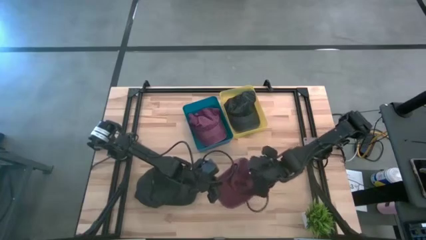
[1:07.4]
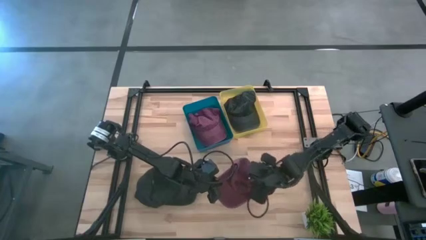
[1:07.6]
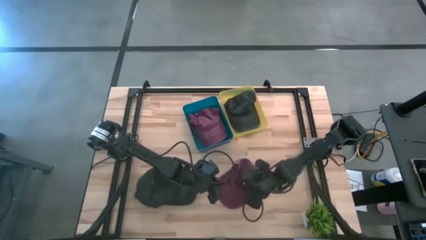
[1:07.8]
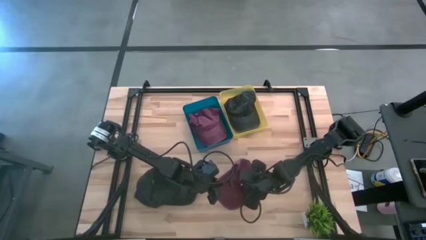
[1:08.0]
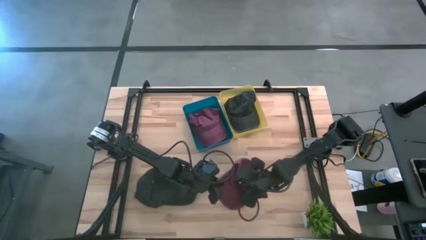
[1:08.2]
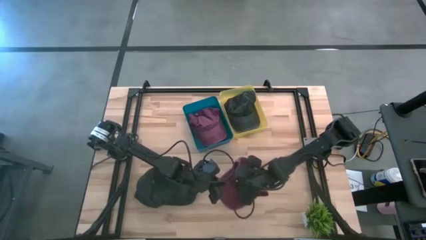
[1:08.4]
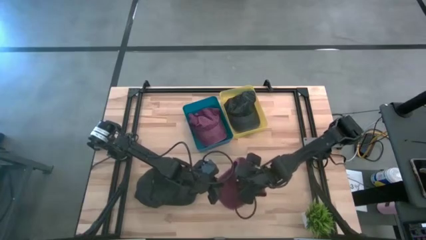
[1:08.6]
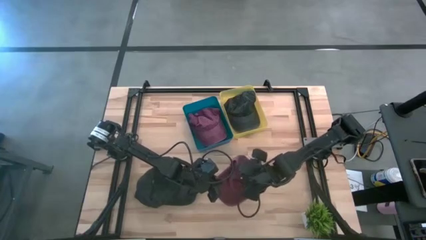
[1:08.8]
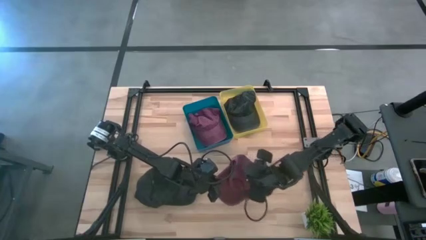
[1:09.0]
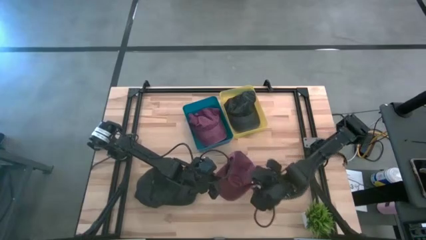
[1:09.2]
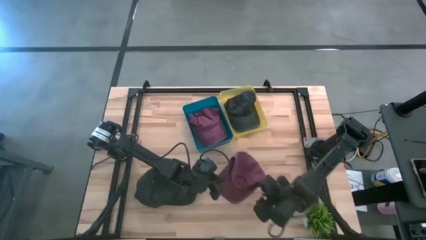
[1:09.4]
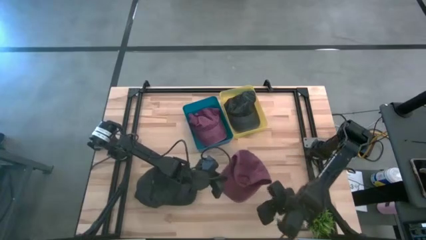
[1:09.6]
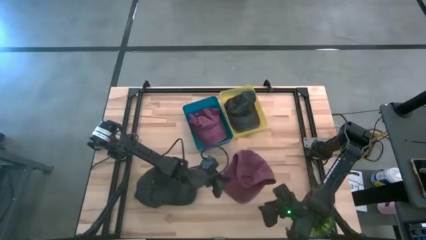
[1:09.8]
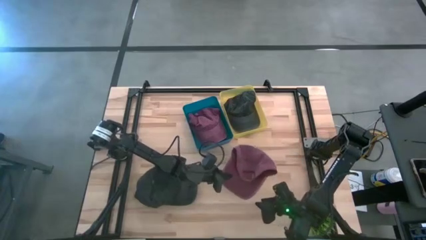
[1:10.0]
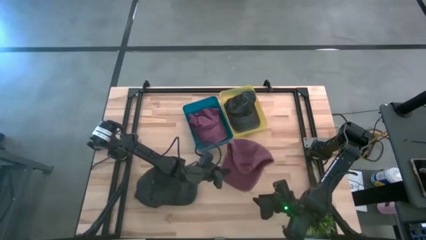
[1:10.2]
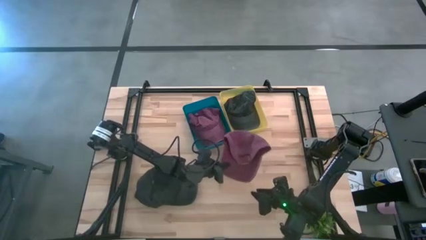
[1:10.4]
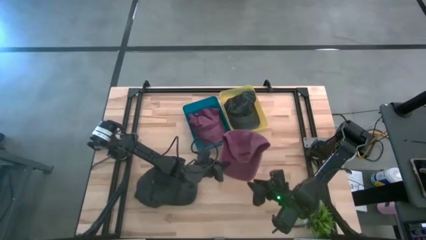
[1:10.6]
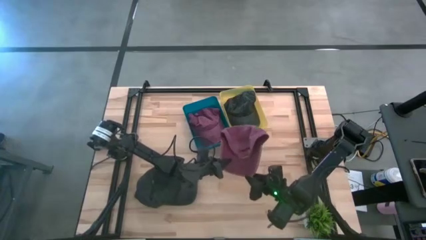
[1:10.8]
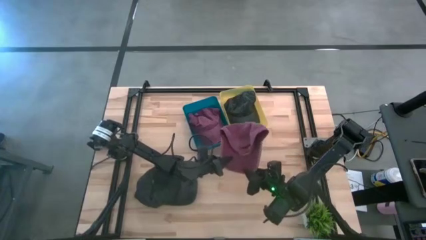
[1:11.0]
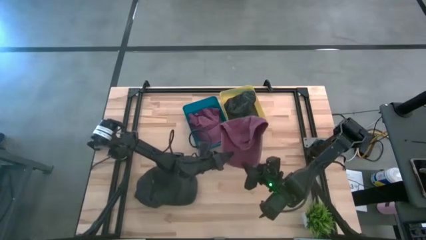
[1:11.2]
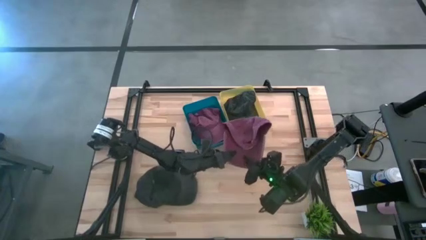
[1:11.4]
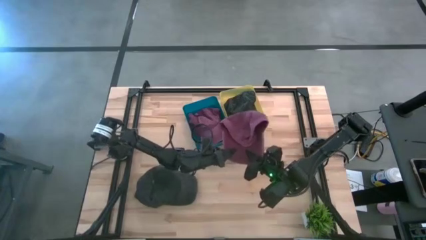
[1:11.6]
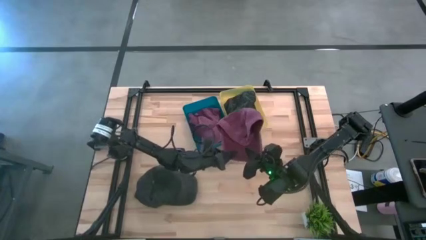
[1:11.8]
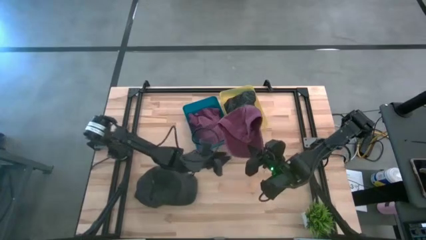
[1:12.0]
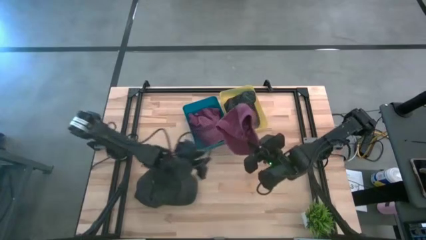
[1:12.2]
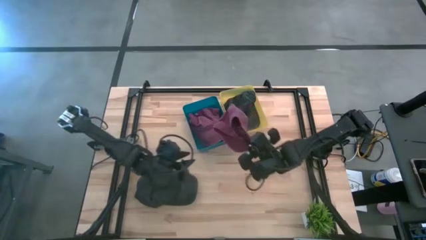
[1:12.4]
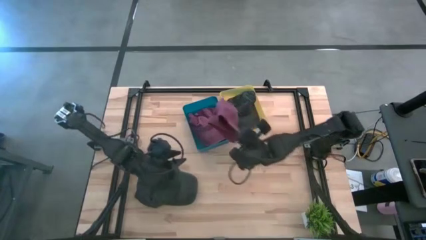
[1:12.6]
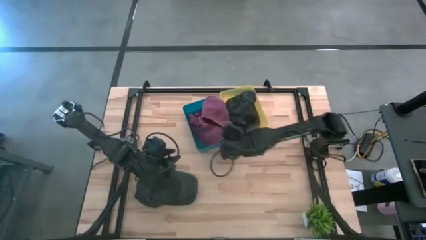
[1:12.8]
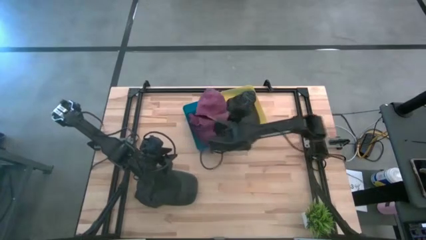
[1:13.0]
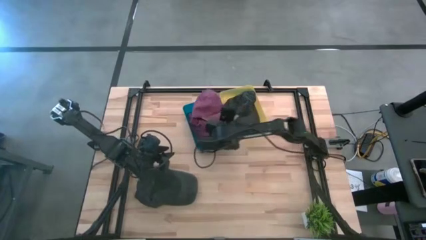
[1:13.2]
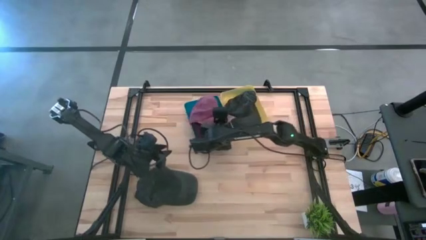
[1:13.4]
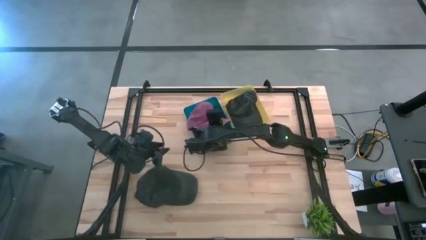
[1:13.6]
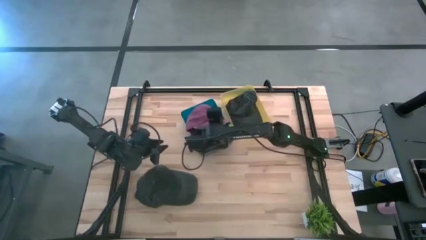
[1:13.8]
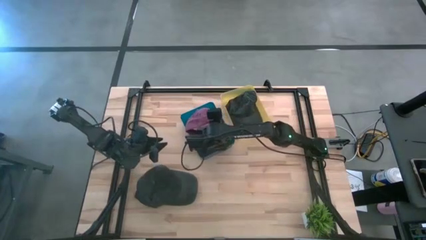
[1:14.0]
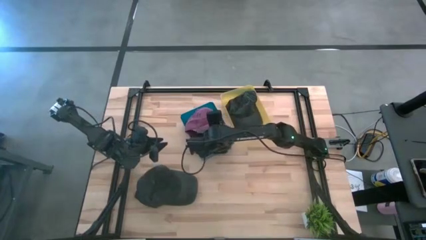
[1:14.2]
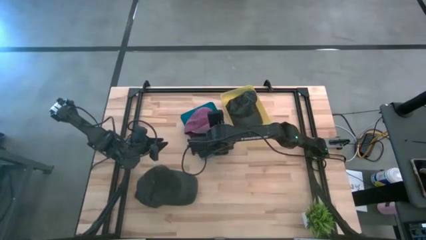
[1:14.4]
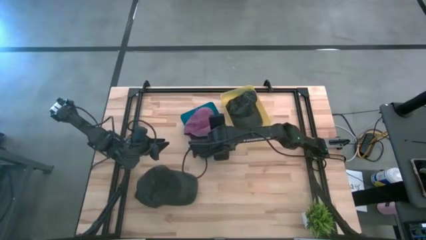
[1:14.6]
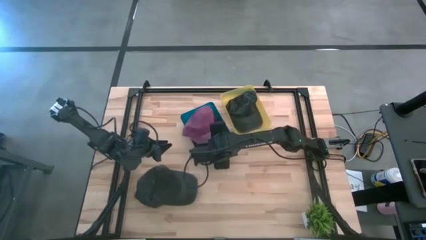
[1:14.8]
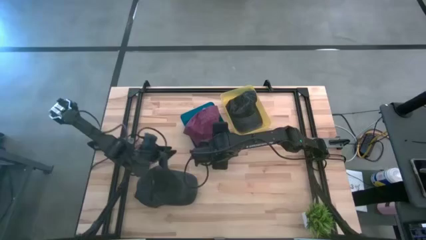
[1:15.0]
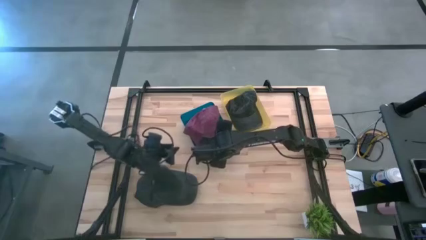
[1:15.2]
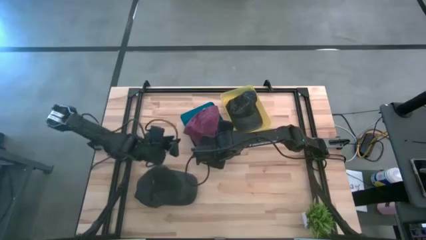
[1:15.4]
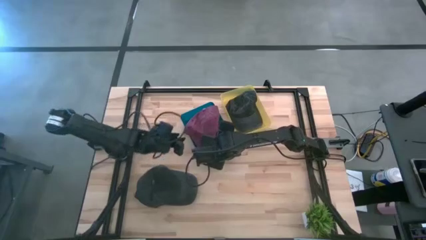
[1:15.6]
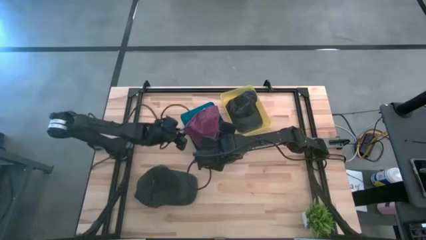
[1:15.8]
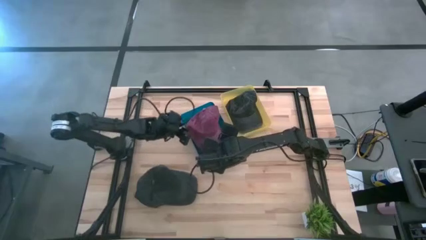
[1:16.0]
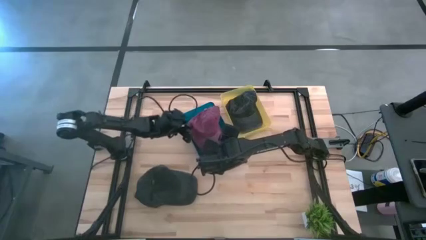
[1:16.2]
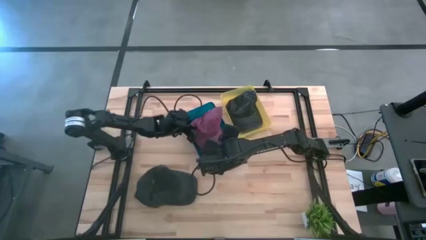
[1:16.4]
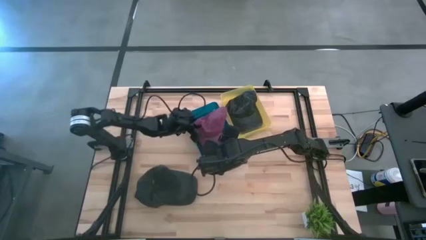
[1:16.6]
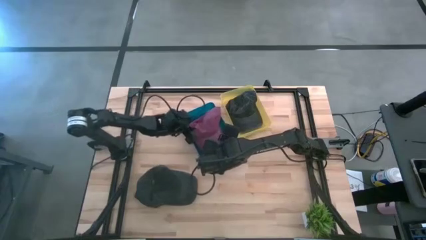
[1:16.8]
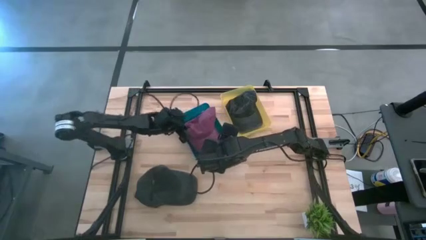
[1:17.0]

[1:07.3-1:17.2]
Task: Pick & Place hat
Put the red cap into the blue bin

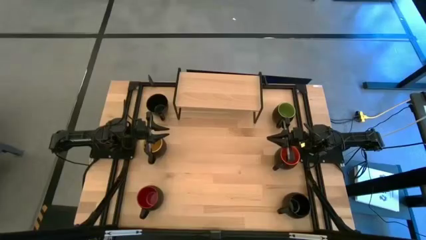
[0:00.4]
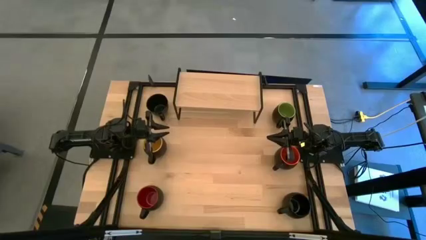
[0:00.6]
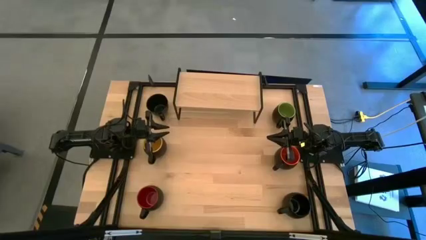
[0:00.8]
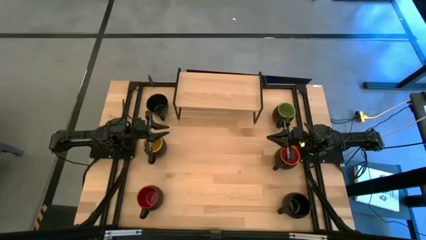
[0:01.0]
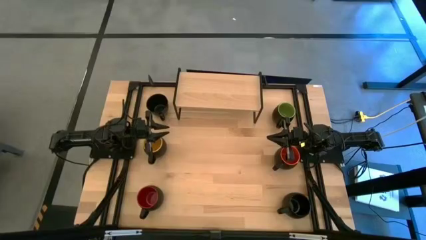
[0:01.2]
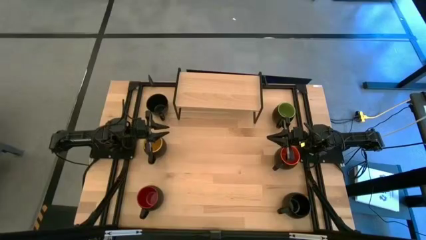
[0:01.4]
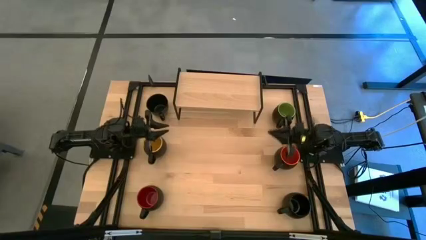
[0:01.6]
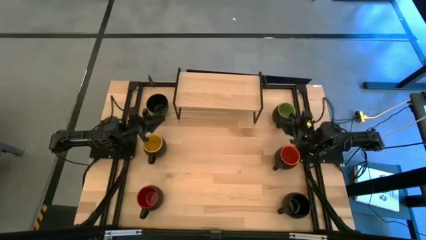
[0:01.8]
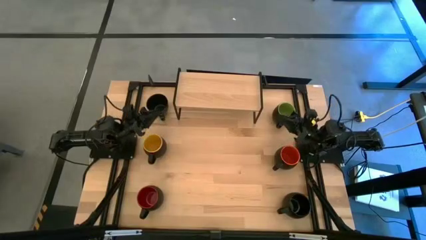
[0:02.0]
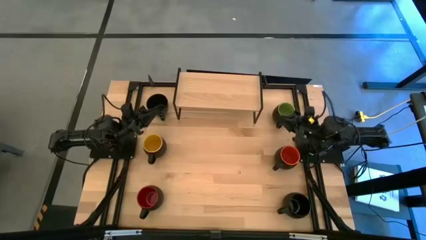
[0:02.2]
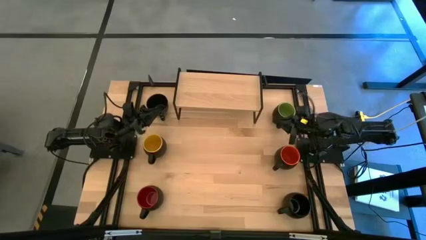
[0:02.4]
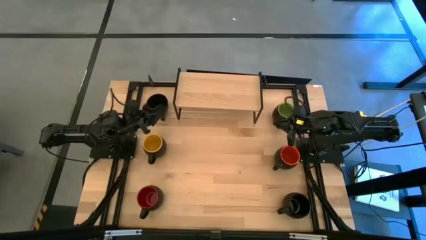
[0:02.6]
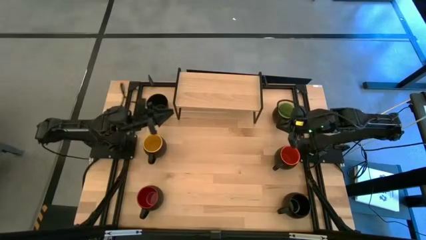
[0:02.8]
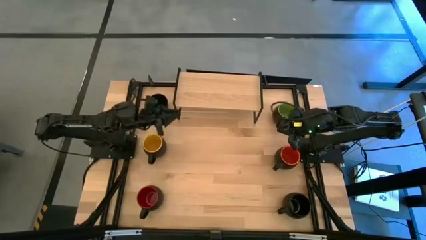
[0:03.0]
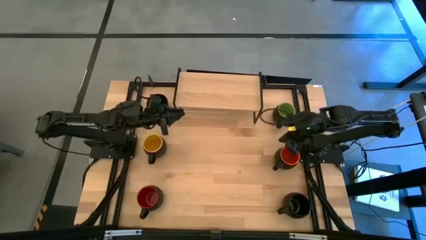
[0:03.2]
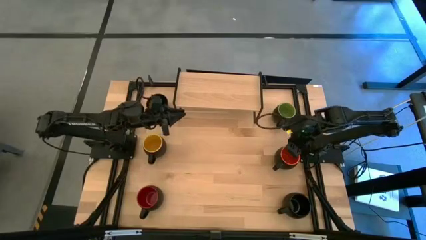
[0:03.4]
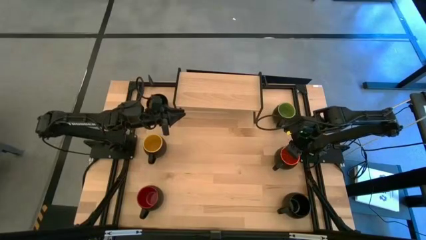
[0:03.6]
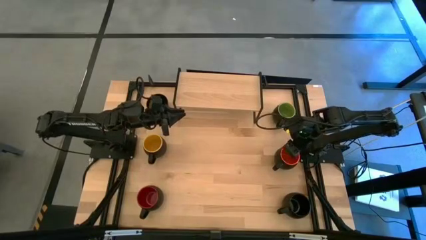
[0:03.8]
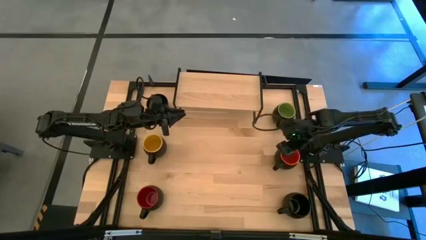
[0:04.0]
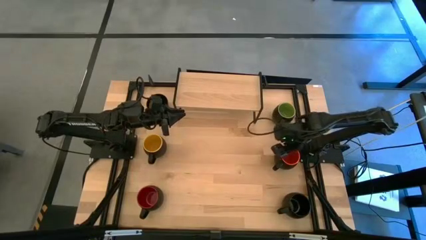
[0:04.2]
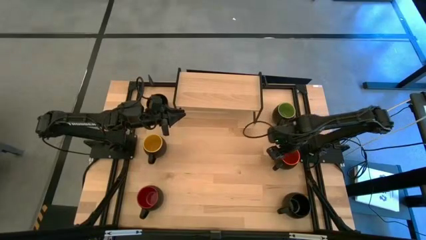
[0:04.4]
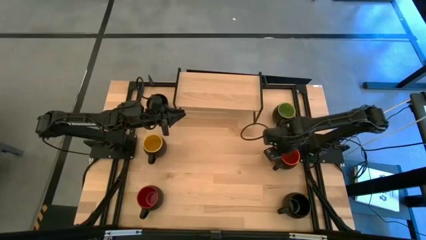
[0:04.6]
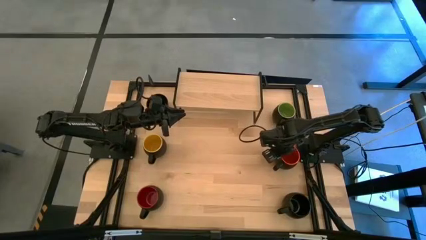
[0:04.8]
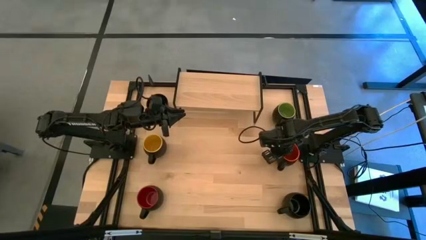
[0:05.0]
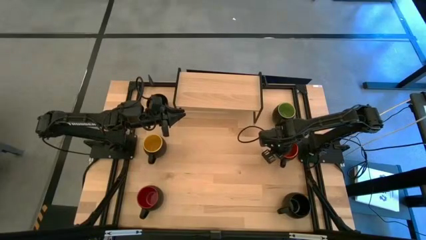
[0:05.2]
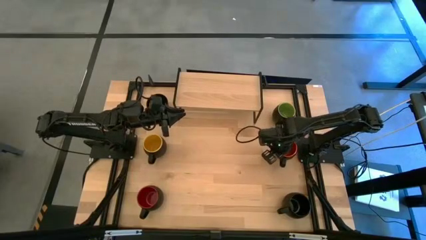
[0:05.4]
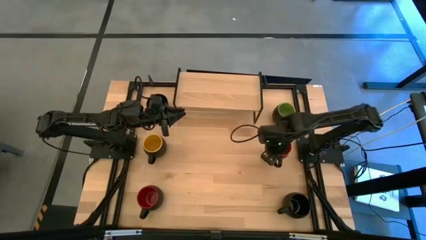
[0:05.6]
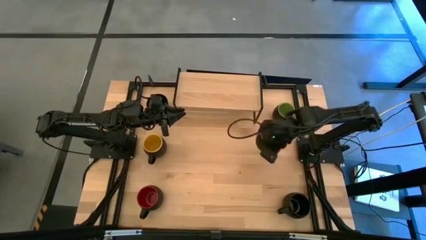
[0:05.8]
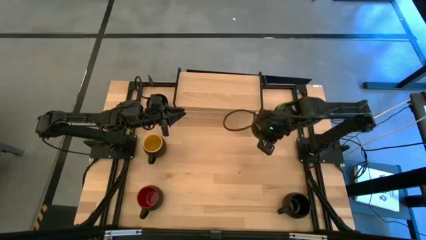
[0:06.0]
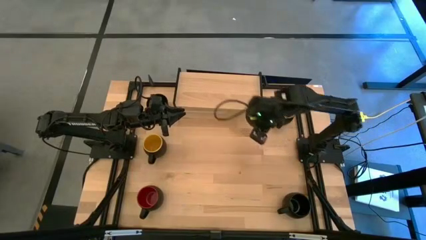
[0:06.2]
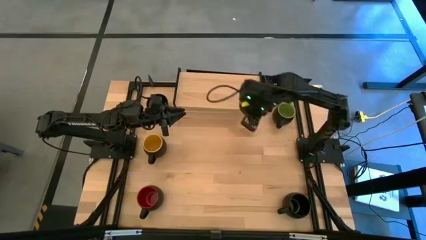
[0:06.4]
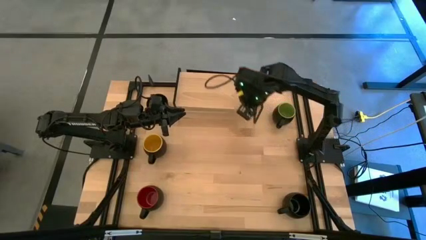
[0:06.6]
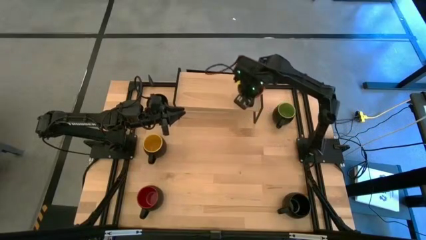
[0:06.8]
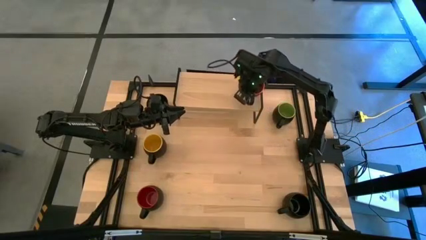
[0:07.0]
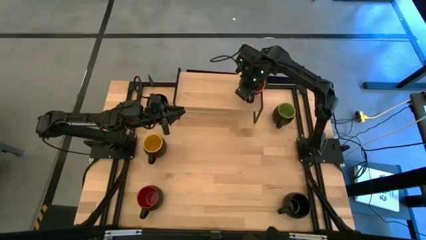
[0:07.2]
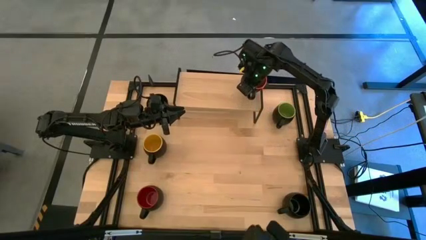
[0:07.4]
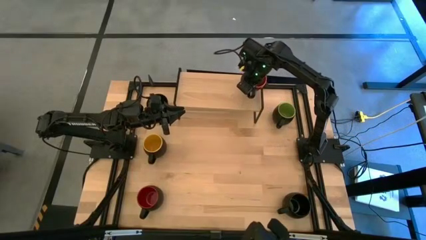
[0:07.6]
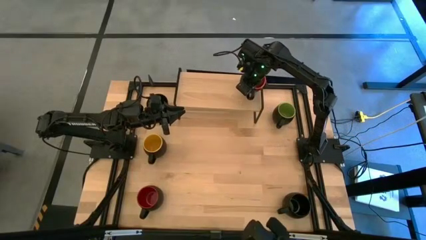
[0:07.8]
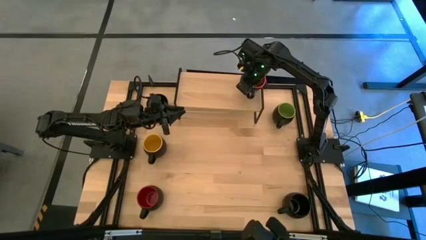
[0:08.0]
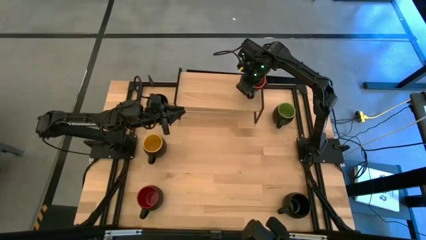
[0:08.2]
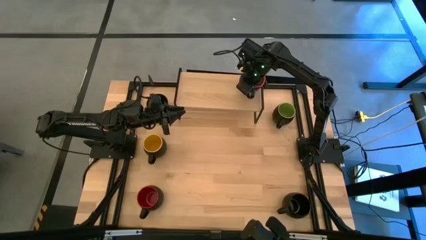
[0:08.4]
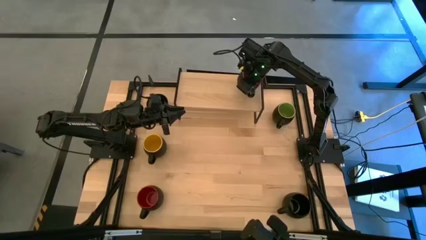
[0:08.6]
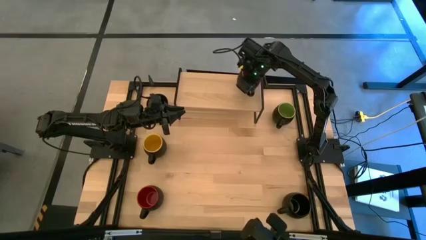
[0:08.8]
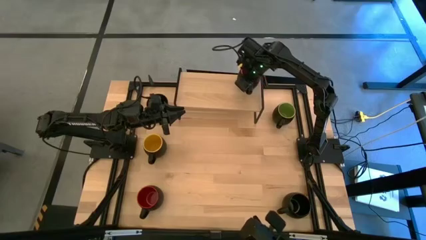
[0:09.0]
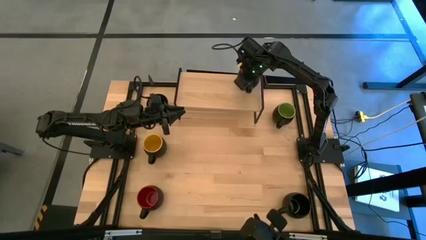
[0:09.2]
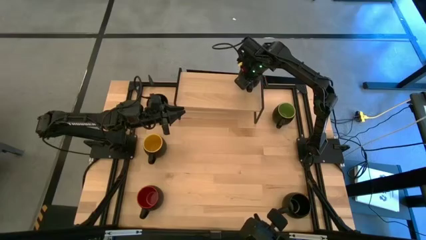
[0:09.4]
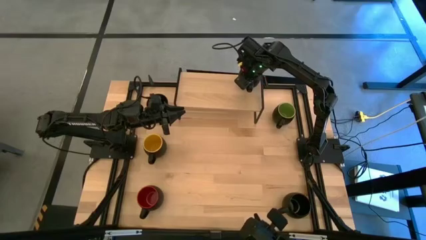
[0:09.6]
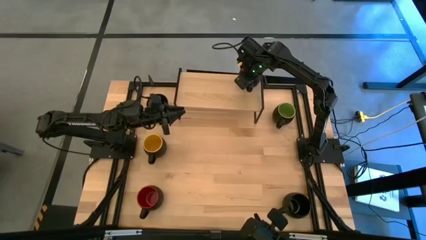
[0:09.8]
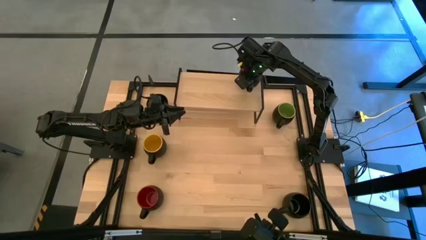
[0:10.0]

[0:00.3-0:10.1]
Task: Place coffee mugs
Put the orange cup on the shelf
